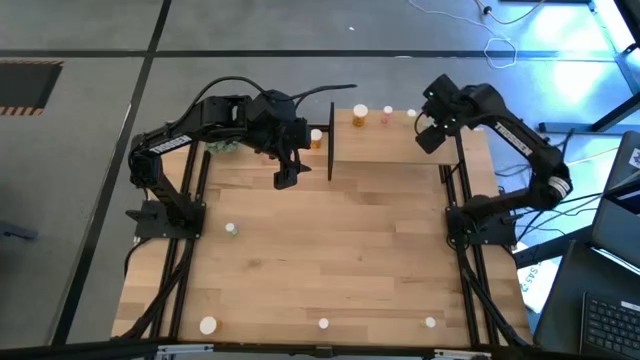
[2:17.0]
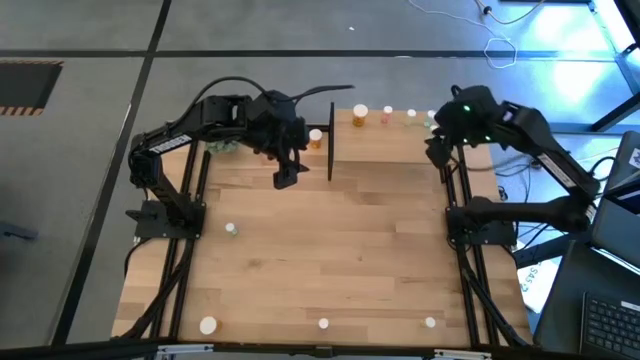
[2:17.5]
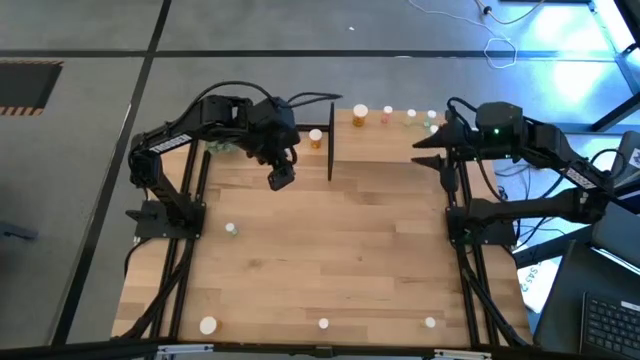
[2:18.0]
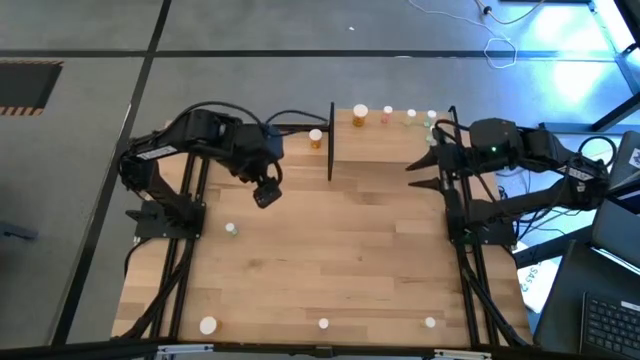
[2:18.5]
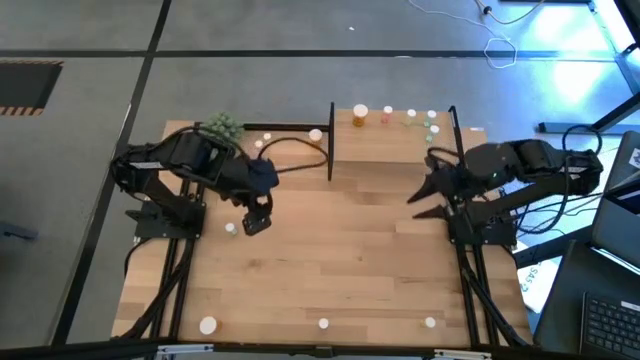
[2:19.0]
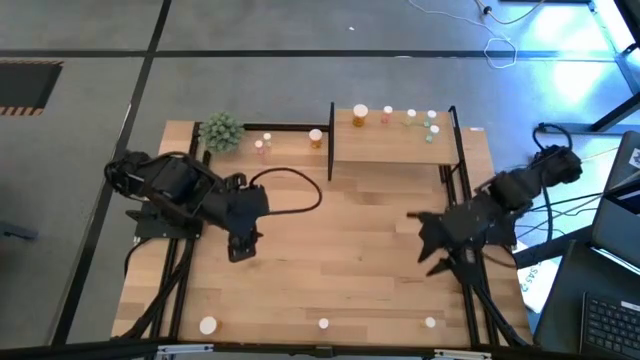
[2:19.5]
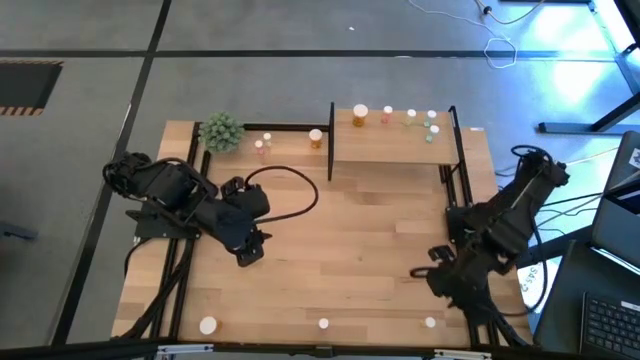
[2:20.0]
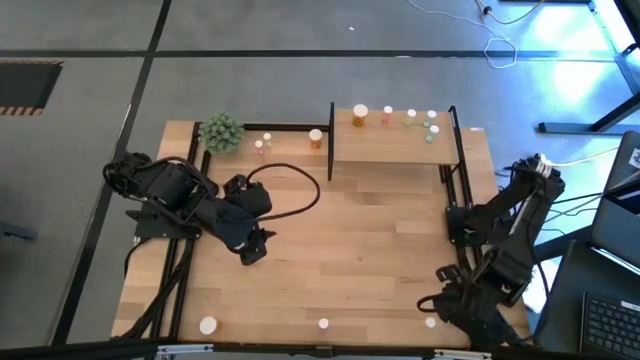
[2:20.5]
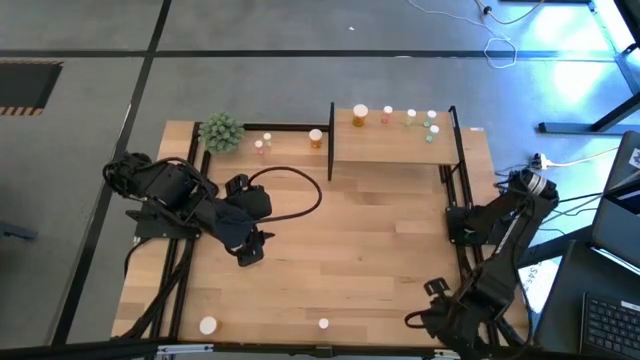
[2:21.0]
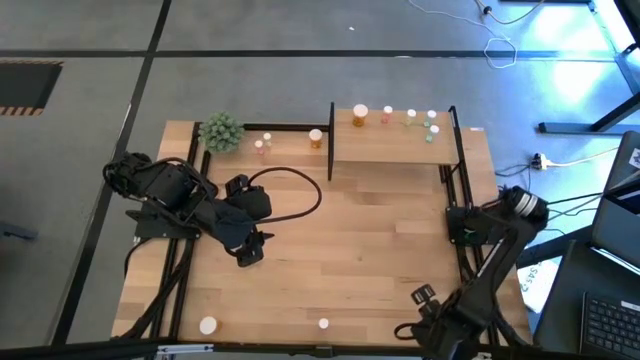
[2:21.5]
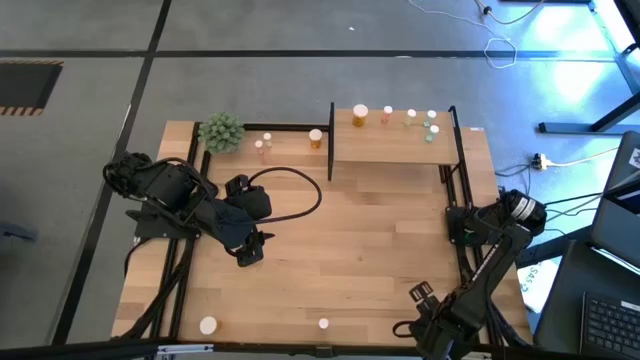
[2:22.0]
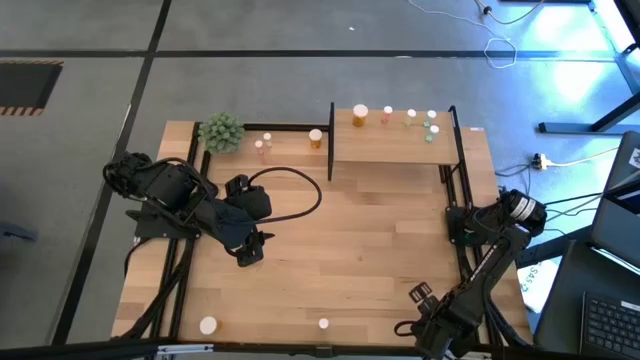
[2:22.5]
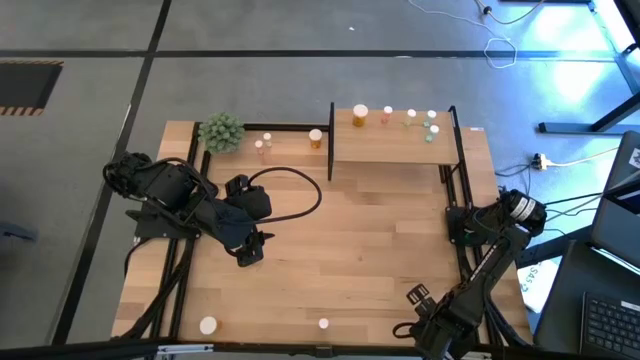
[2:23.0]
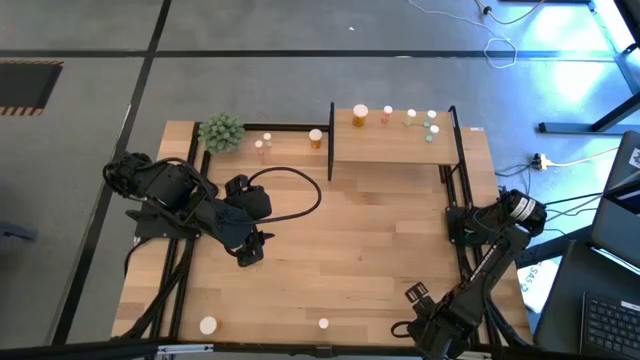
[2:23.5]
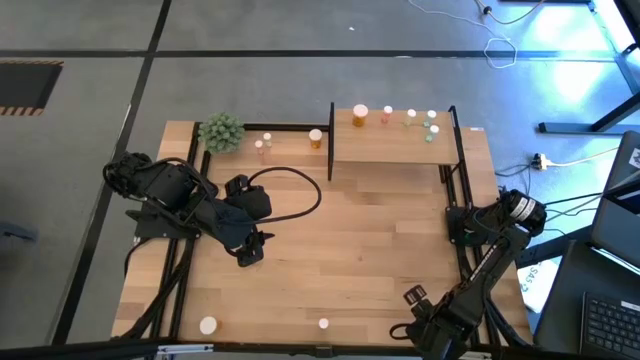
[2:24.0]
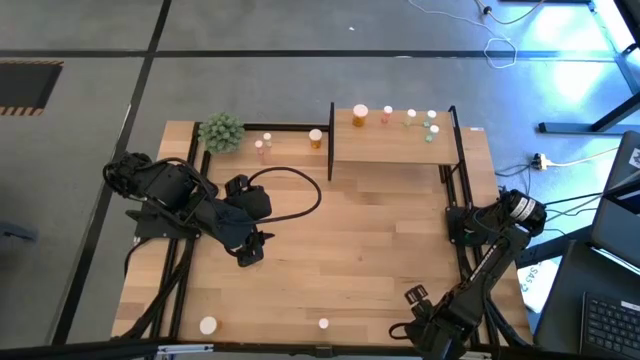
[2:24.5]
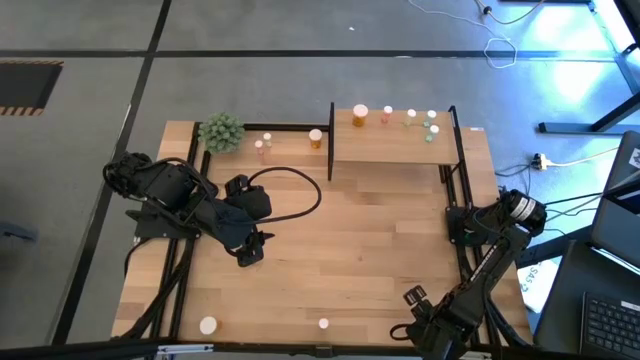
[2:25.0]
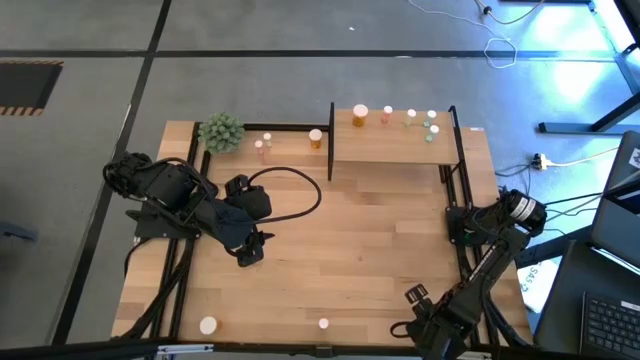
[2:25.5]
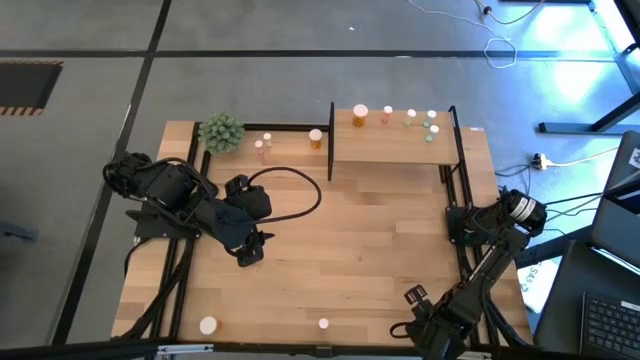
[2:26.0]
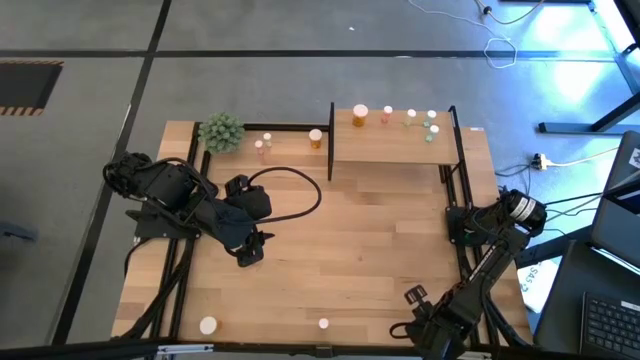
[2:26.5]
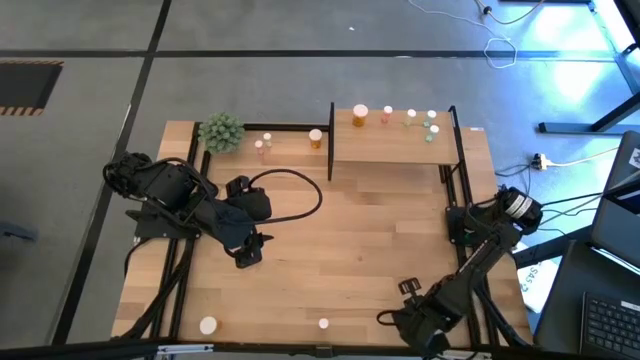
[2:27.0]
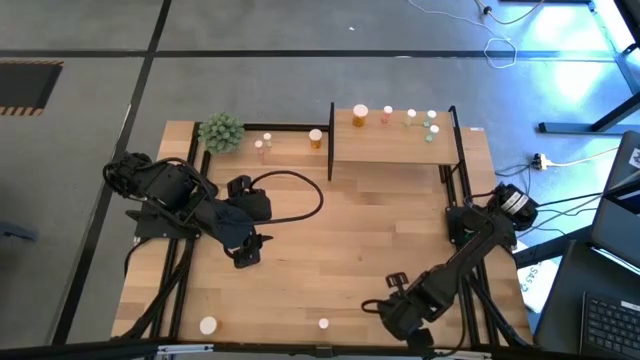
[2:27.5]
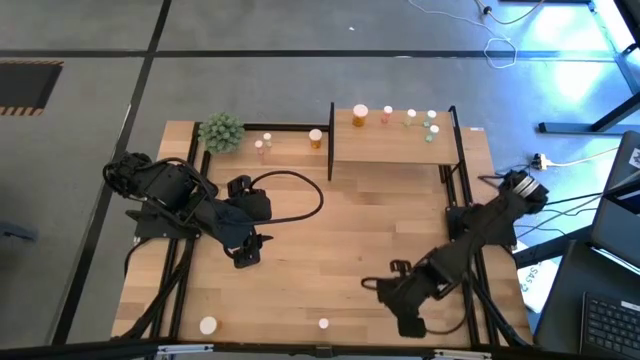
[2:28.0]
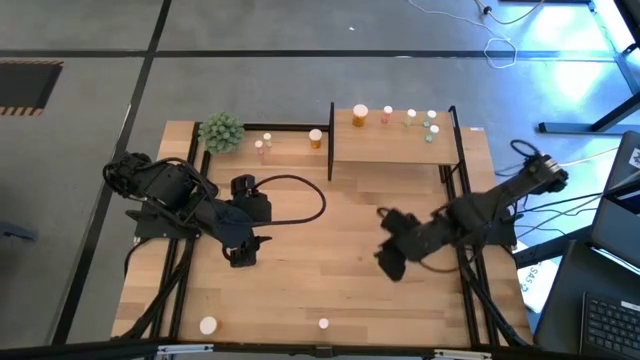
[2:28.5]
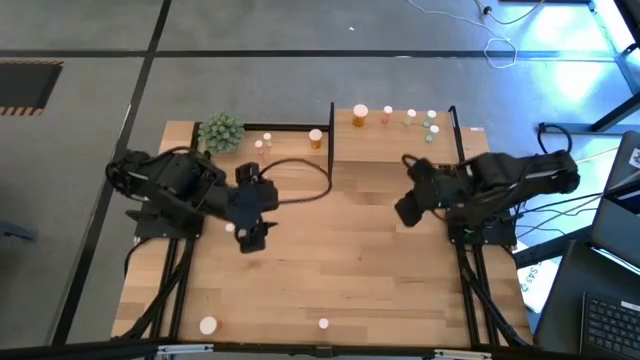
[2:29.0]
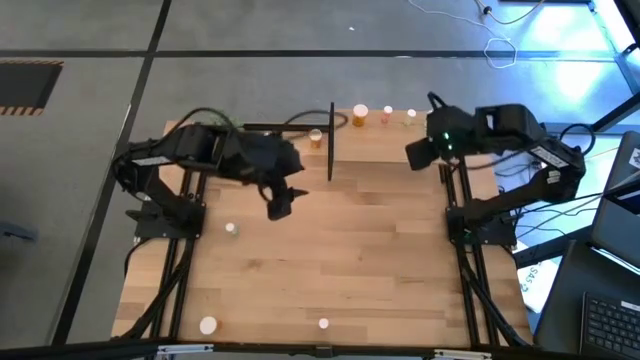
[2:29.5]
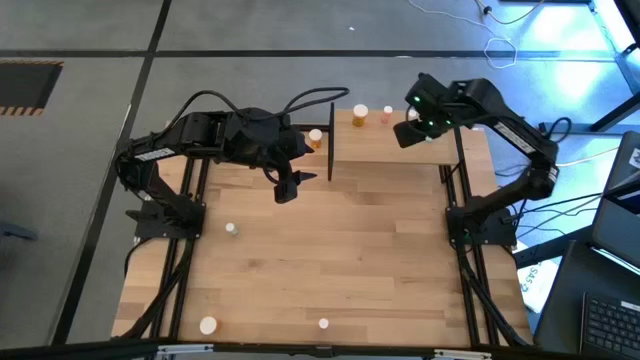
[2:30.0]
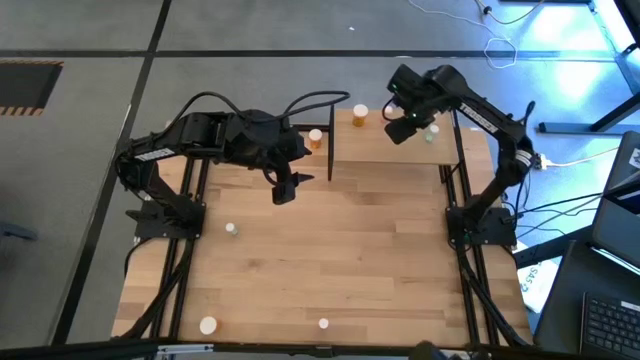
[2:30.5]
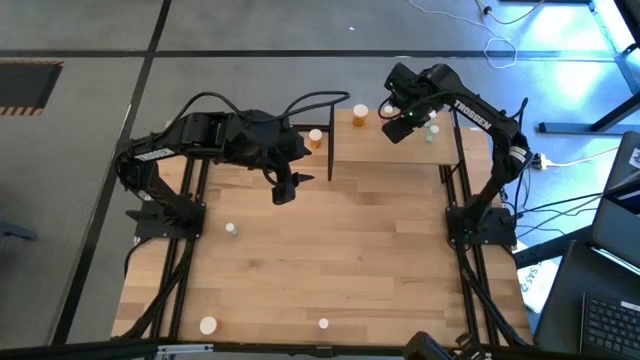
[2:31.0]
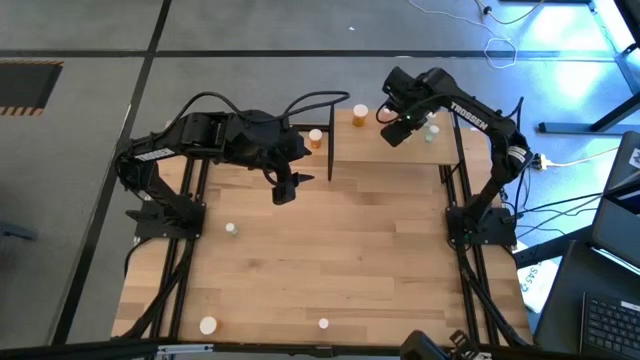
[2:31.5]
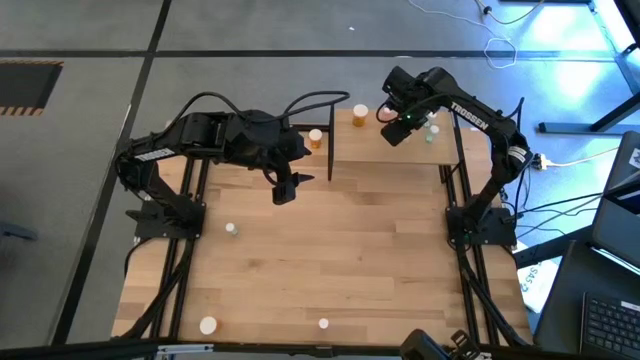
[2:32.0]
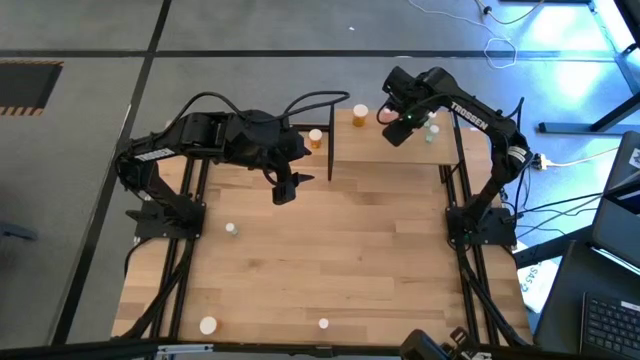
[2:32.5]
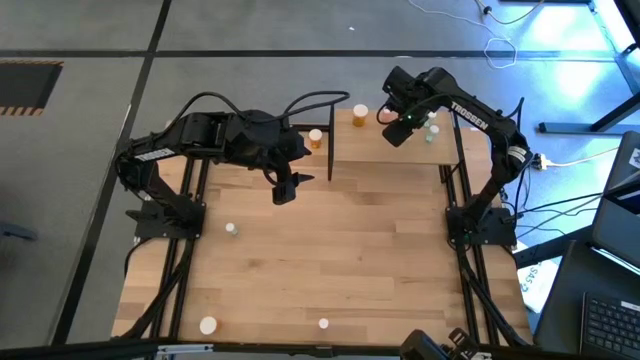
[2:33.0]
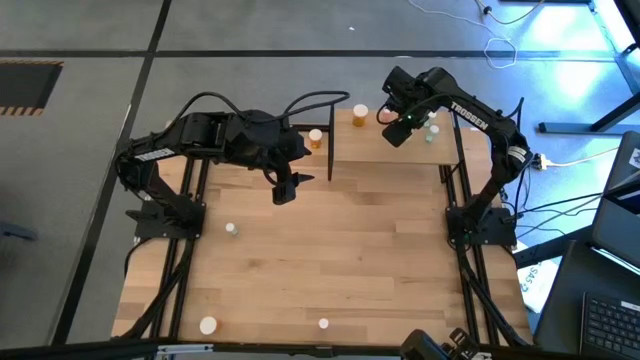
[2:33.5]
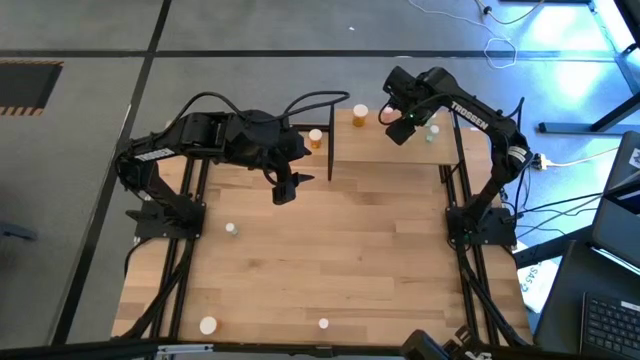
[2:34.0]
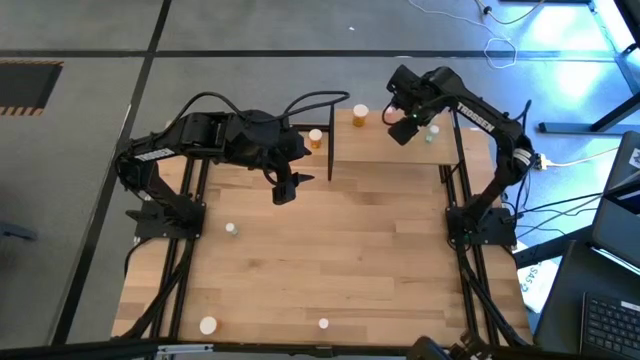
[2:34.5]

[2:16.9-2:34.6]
Task: Pick and place medicine bottles onto shelf by color
Put the bottom yellow pill bottle on the shelf aligned with the other yellow pill bottle

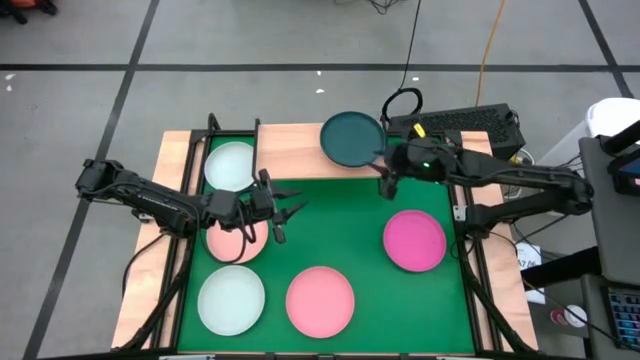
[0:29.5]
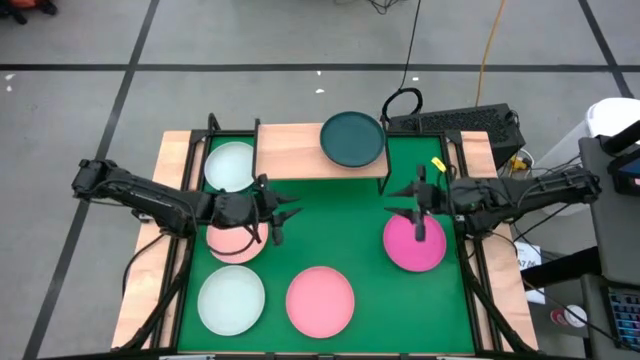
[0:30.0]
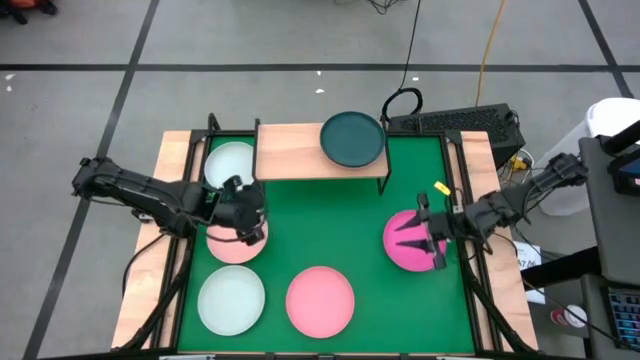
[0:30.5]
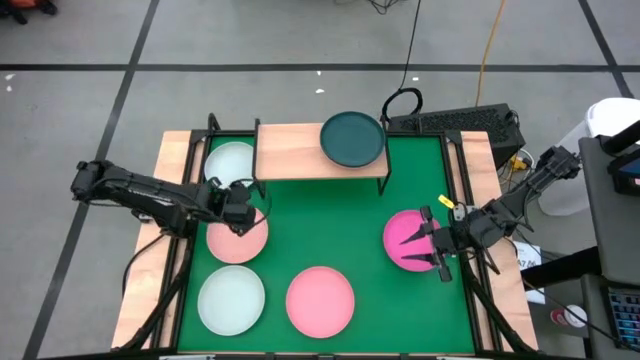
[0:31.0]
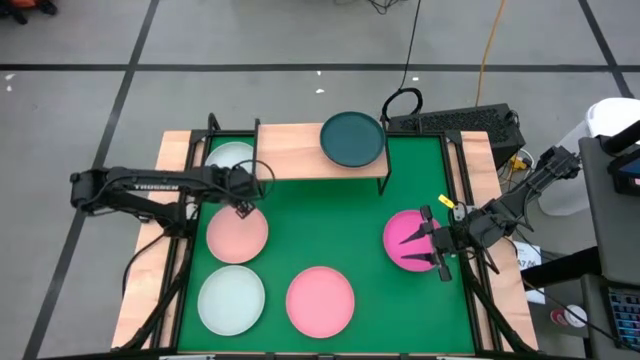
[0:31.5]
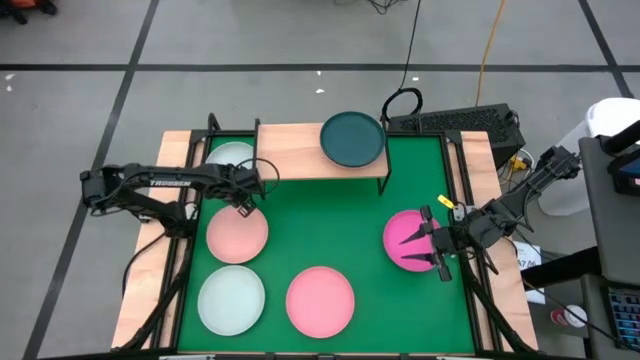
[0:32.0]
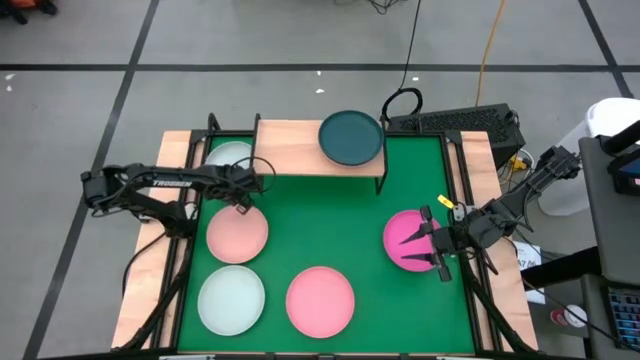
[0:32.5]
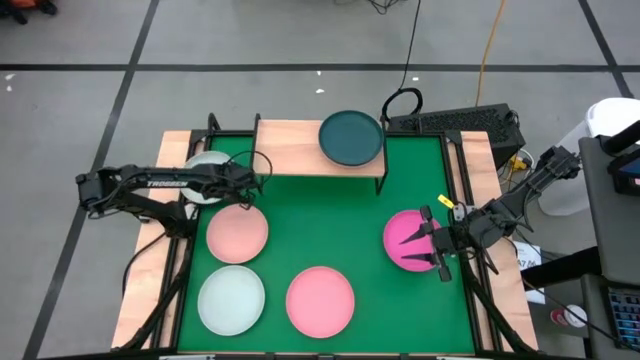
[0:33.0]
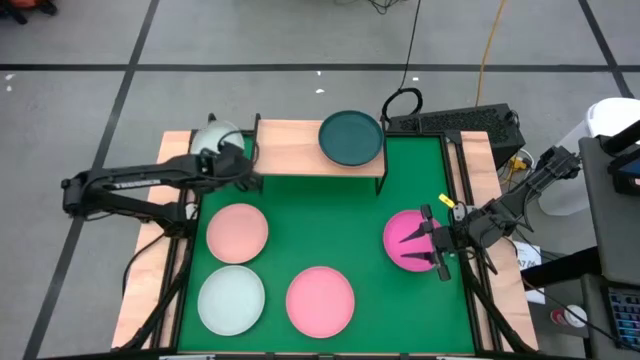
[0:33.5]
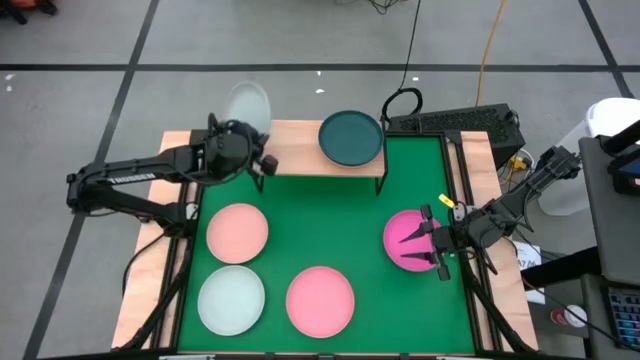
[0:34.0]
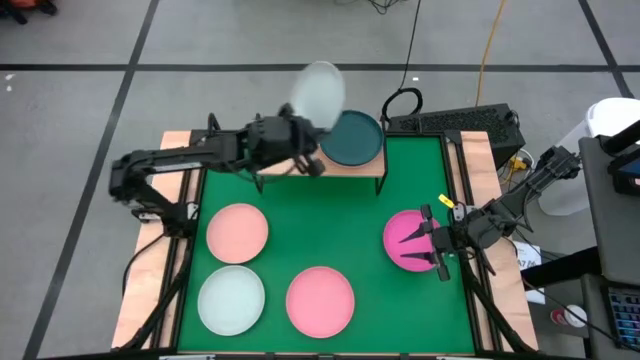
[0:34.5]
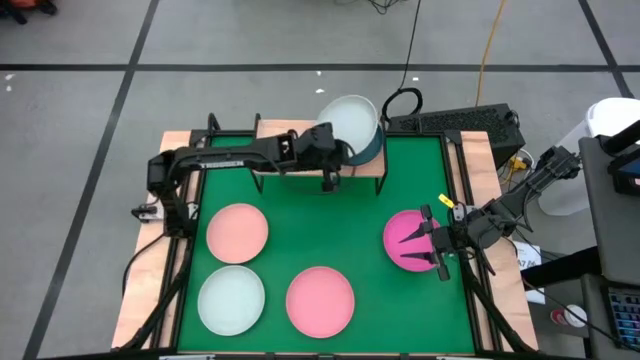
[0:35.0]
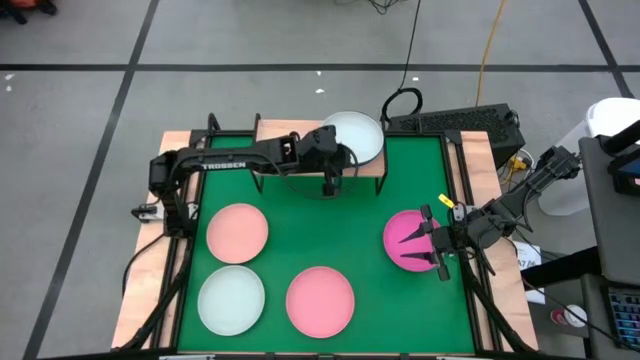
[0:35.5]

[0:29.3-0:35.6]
Task: Place and stack plates onto a shelf
Stack the top white plate on top of the green plate on the shelf
